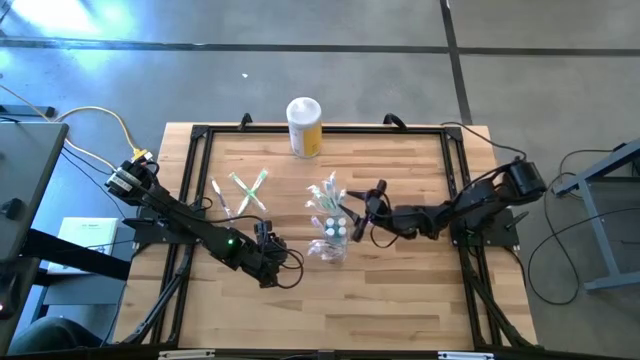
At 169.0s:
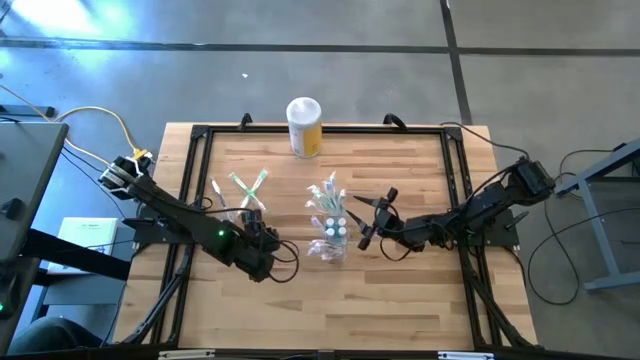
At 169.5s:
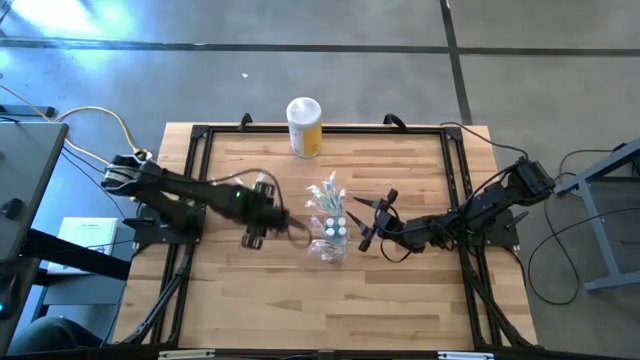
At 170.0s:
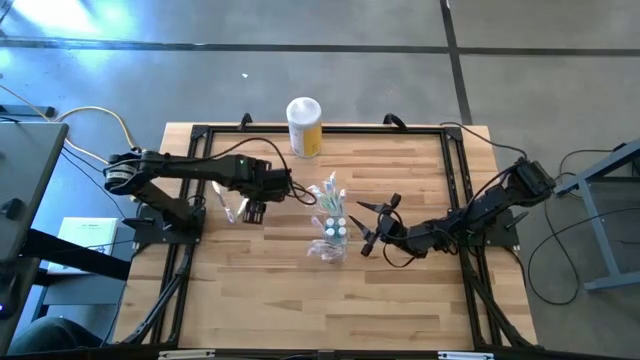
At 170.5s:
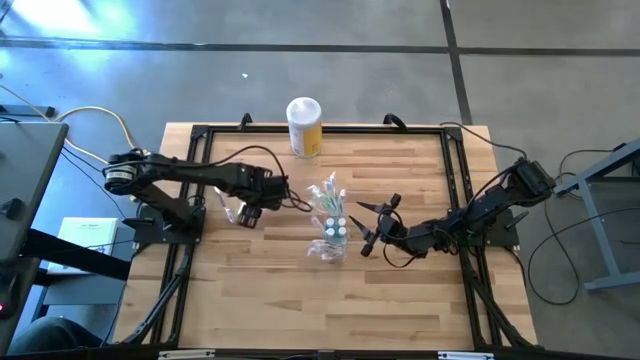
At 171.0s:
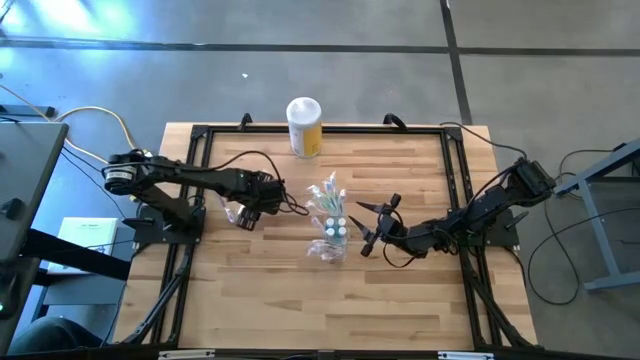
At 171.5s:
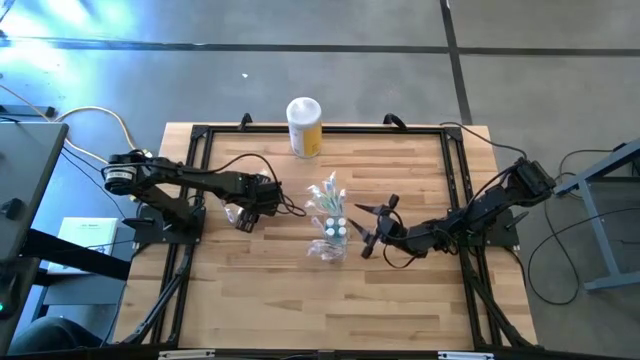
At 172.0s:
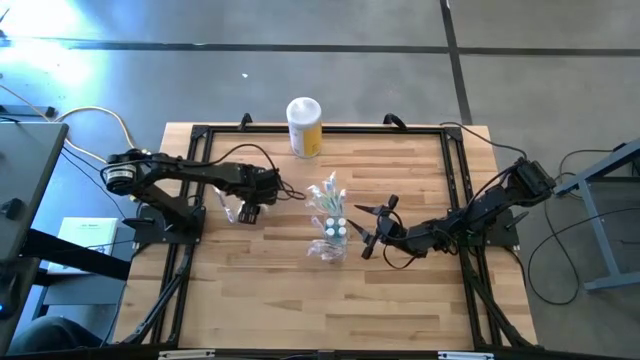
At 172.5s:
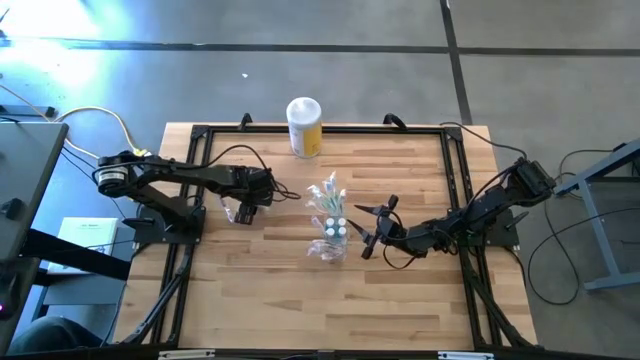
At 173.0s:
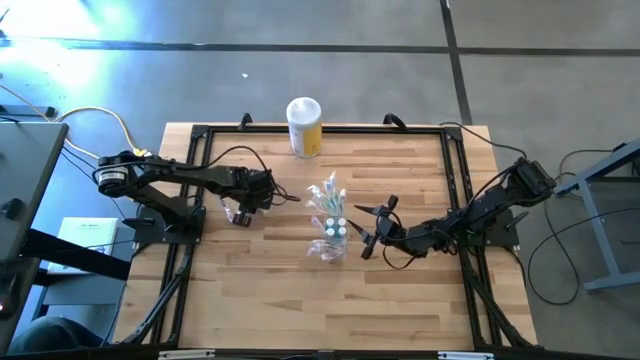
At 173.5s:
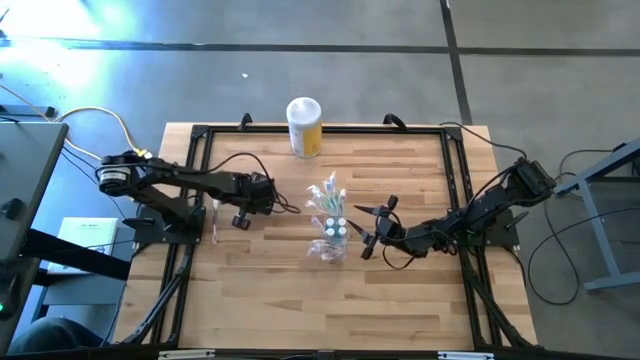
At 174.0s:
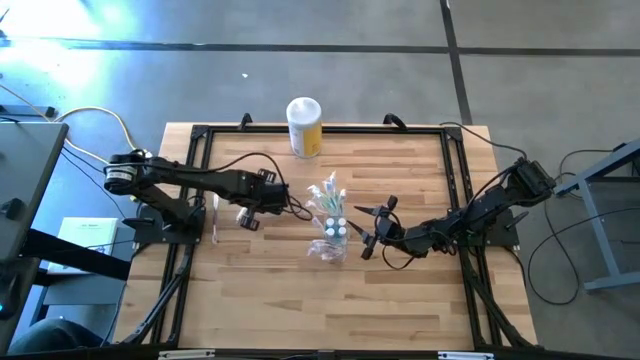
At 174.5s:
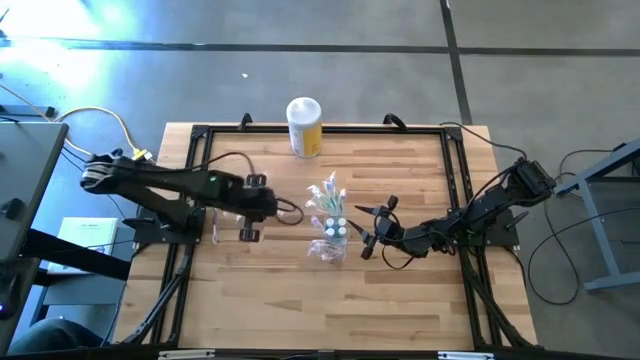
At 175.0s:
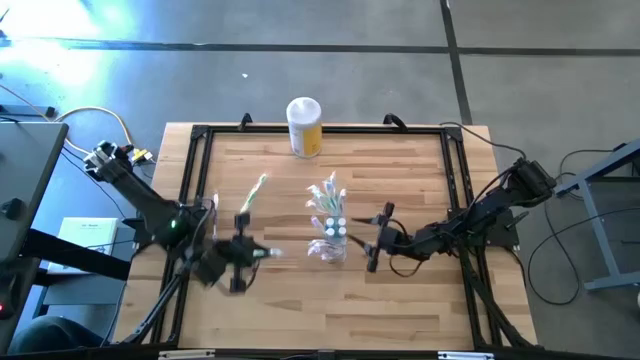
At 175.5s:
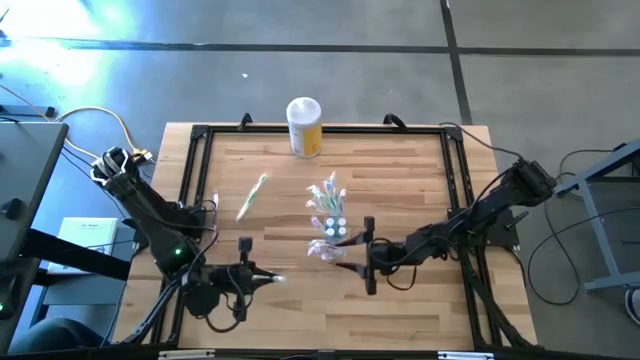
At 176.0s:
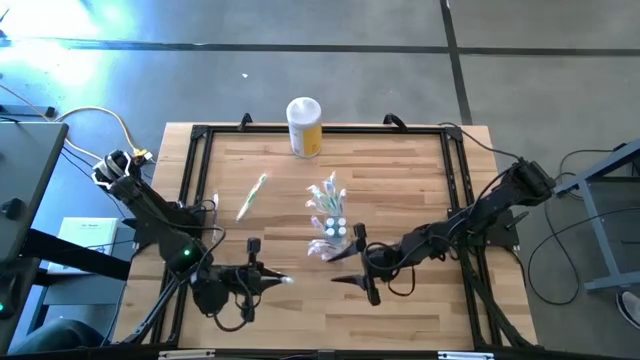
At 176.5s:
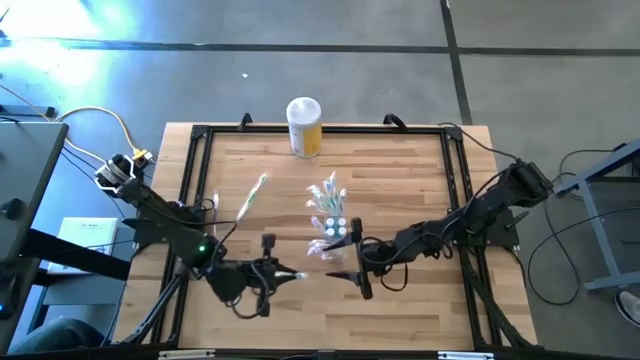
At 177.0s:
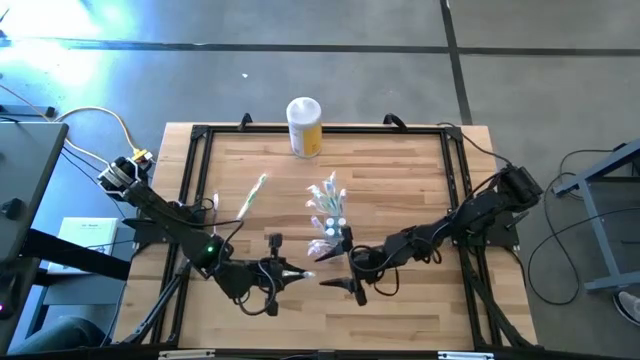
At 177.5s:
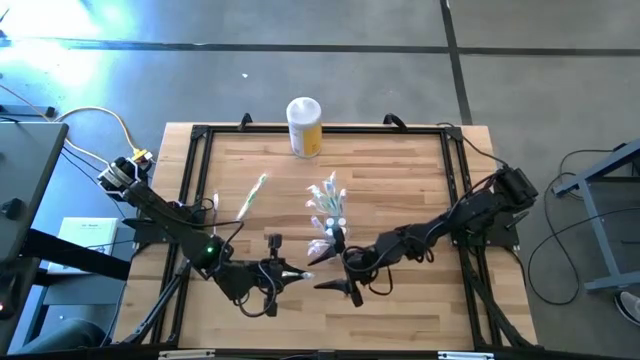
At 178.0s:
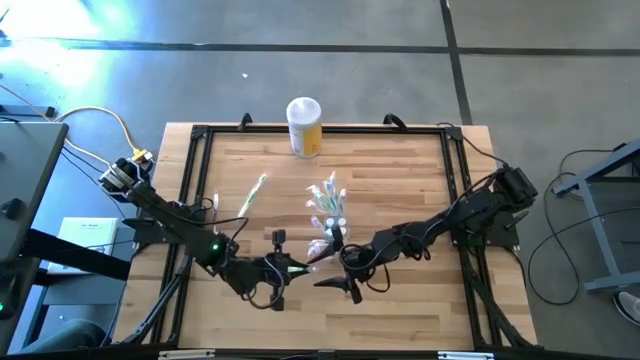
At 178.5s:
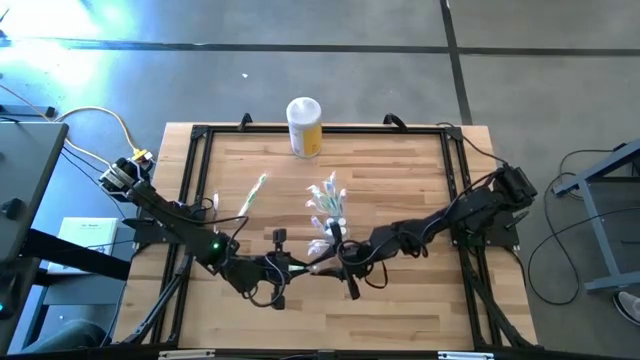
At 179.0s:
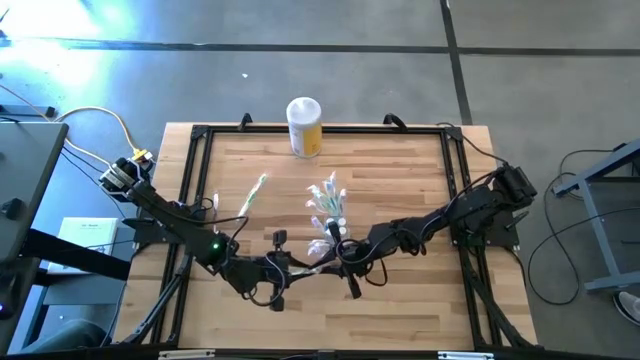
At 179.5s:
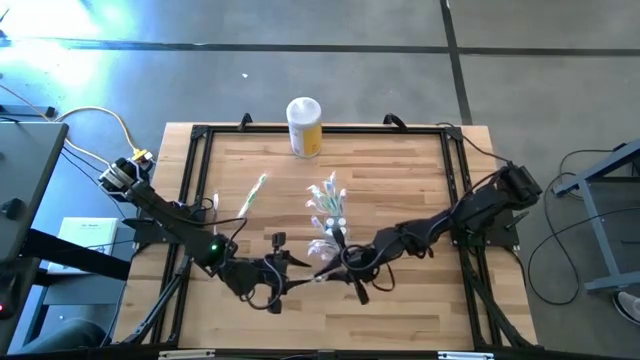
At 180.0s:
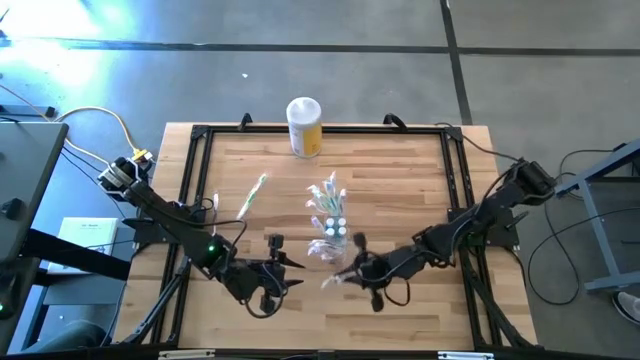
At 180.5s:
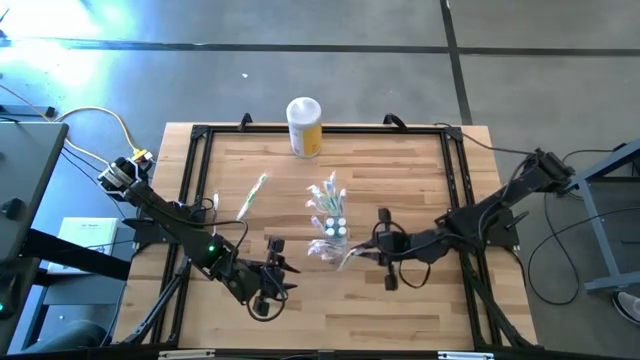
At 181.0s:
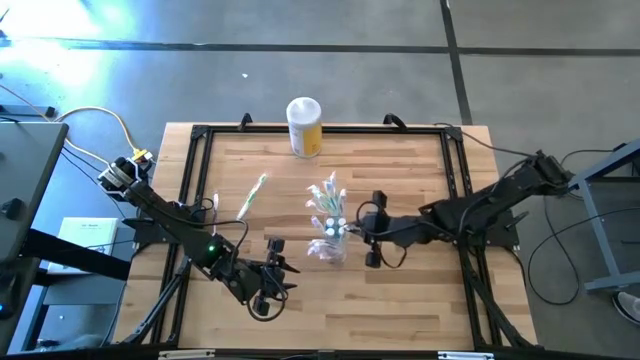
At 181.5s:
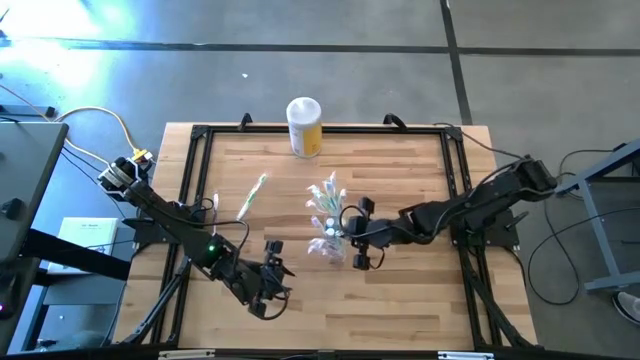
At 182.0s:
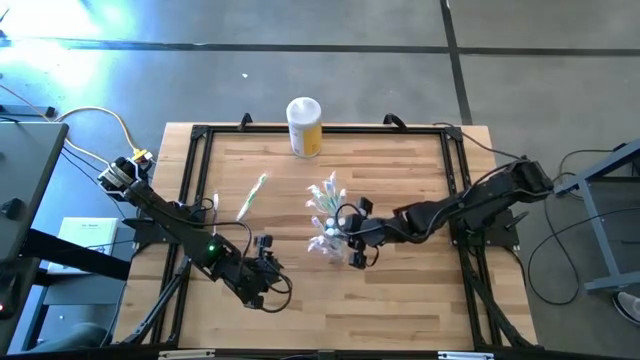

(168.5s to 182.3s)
Task: Pick & Place toothbrushing station
Put the green toothbrush into the transparent organizer

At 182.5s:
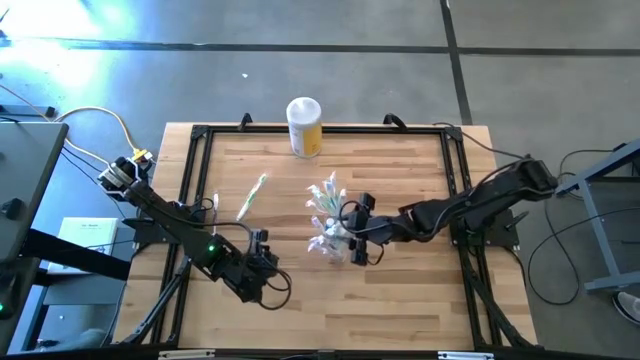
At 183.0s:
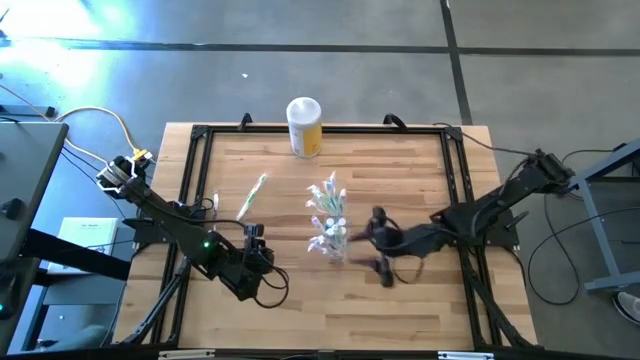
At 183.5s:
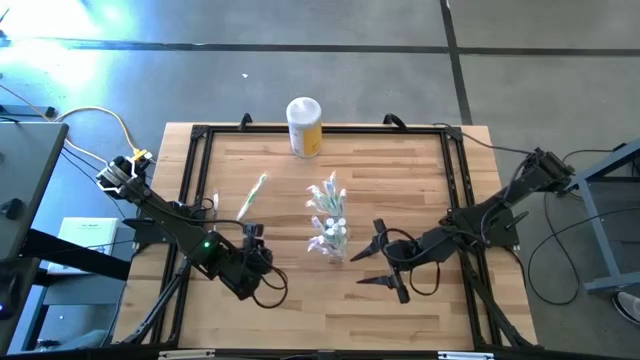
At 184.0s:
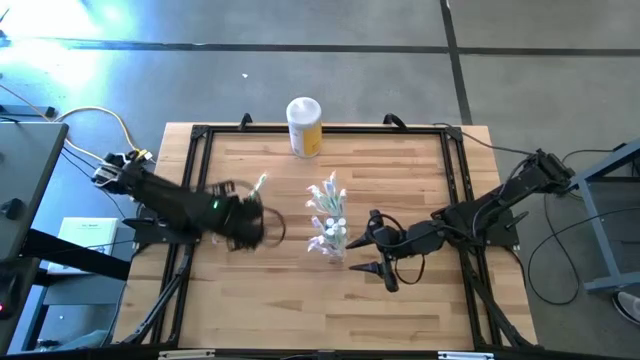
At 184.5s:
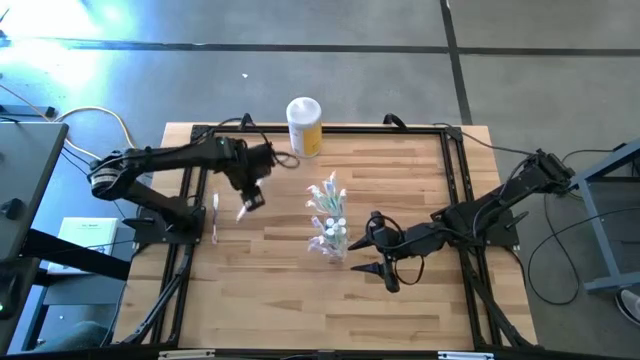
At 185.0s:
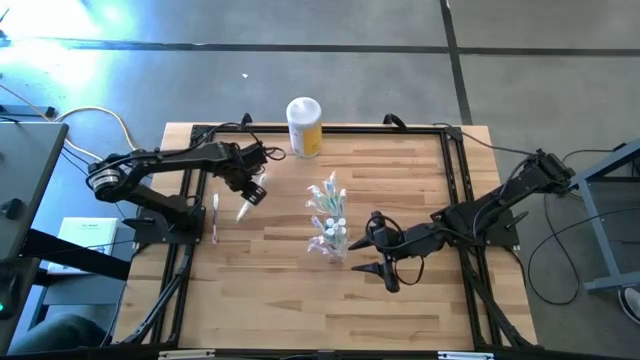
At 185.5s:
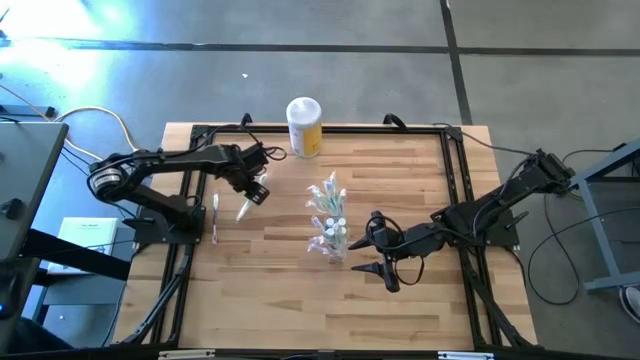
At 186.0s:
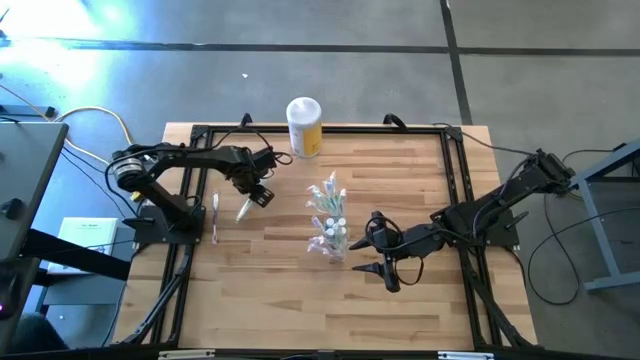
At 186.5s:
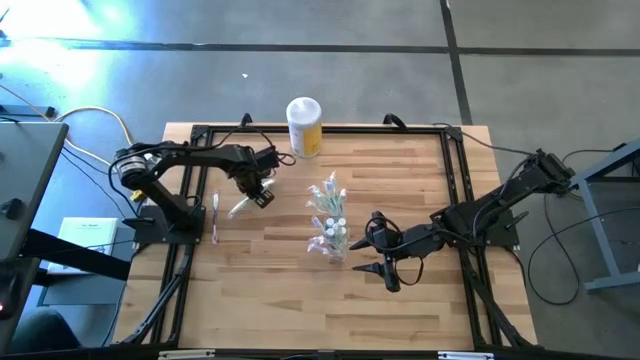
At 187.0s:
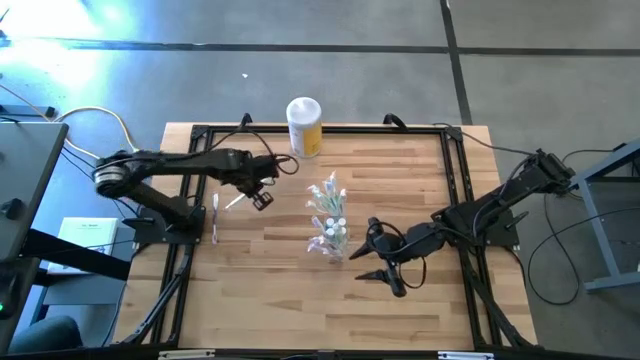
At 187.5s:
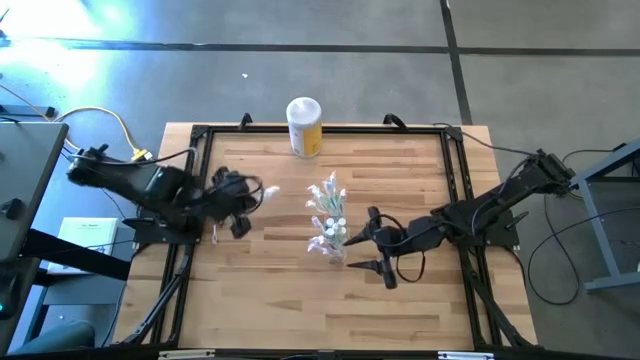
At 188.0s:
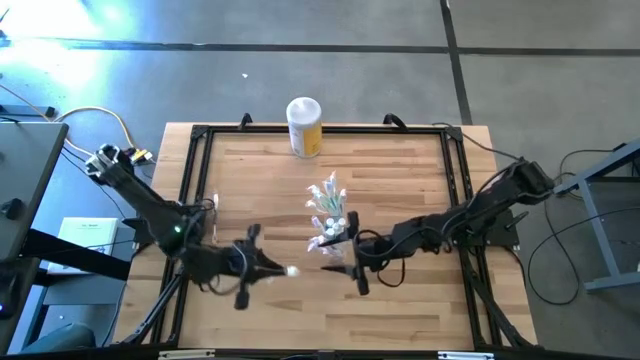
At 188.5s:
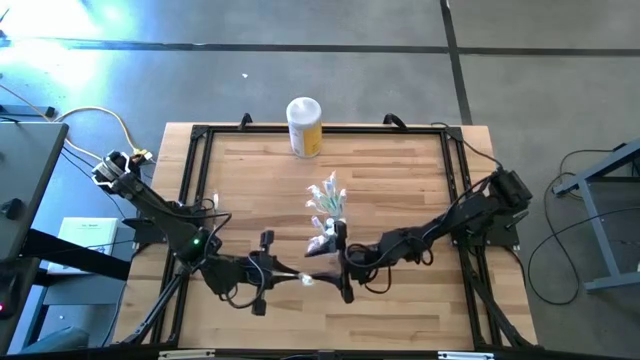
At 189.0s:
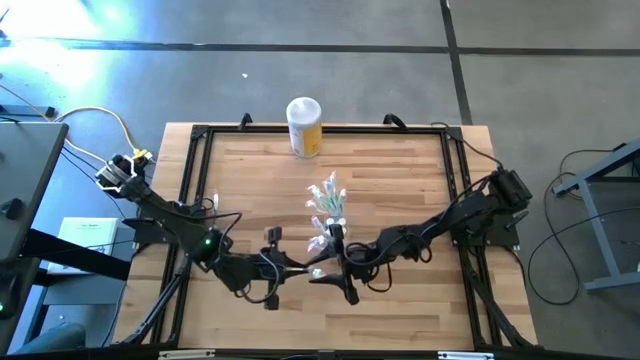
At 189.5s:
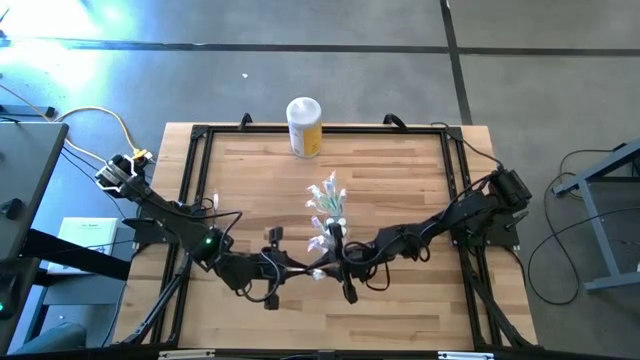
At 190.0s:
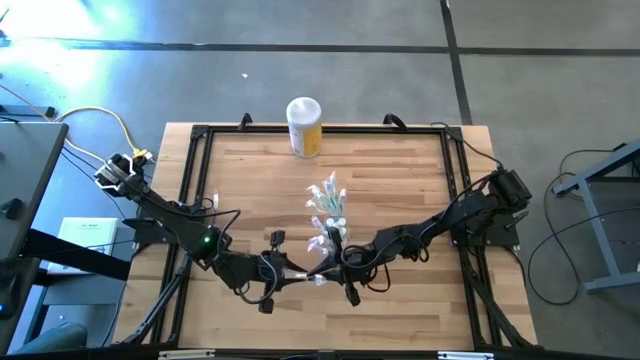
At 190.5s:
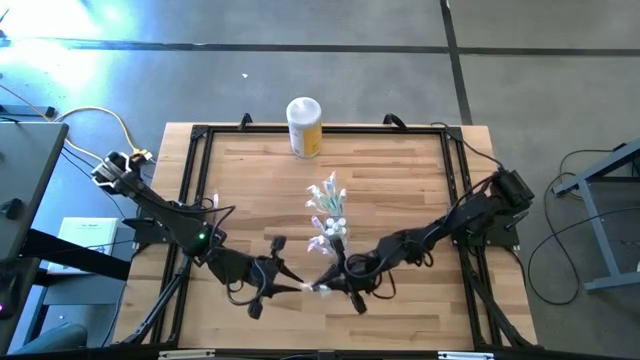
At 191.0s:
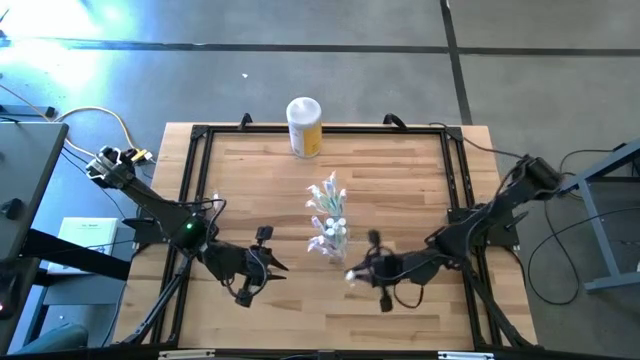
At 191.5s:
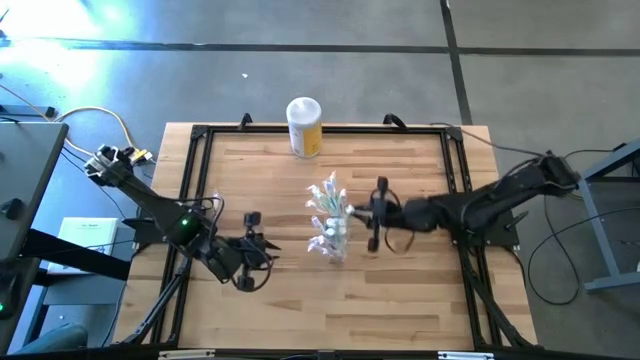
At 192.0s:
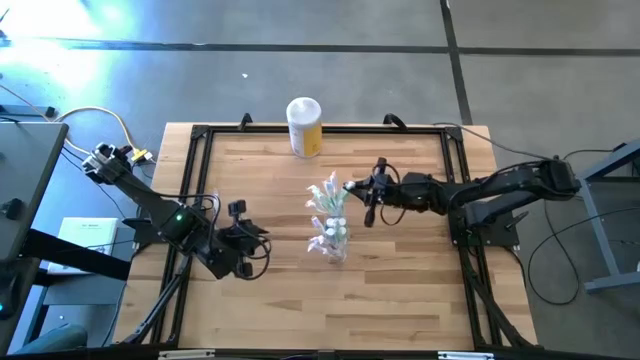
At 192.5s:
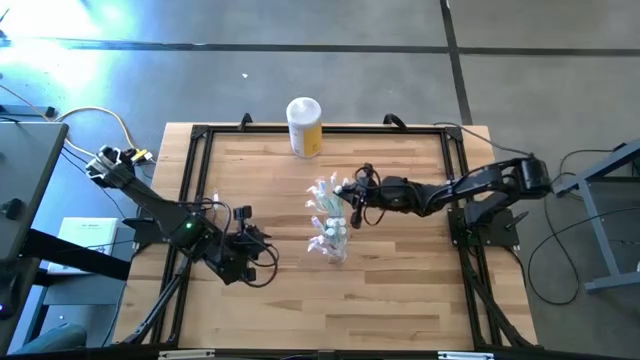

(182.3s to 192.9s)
Put the green toothbrush into the transparent organizer
